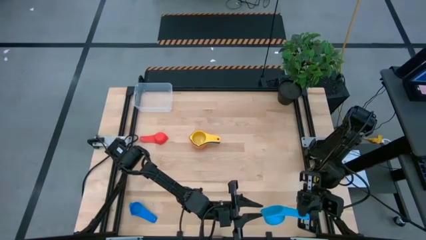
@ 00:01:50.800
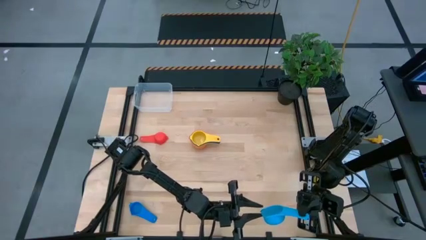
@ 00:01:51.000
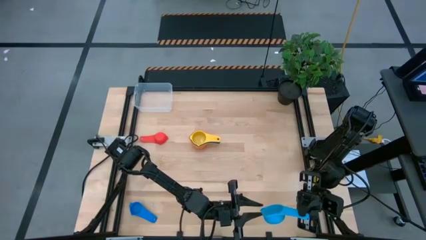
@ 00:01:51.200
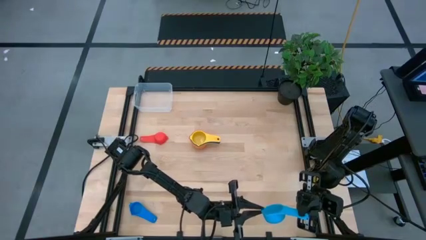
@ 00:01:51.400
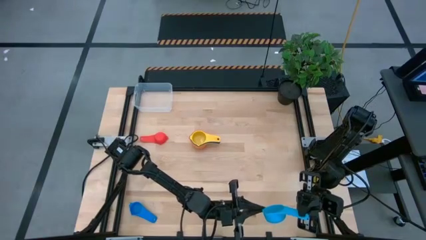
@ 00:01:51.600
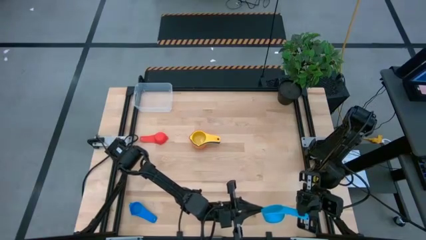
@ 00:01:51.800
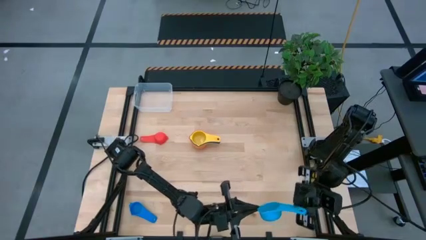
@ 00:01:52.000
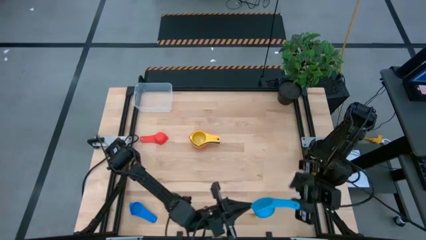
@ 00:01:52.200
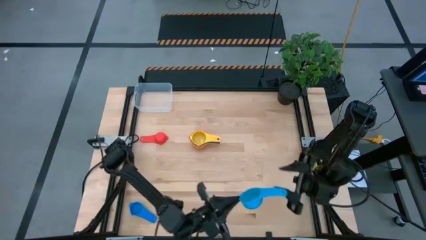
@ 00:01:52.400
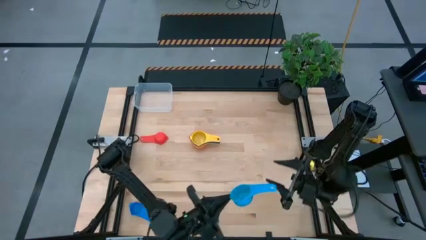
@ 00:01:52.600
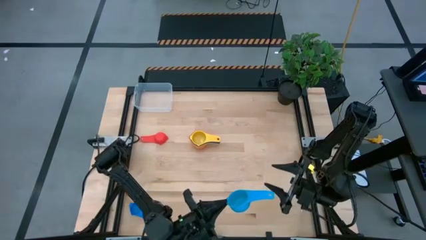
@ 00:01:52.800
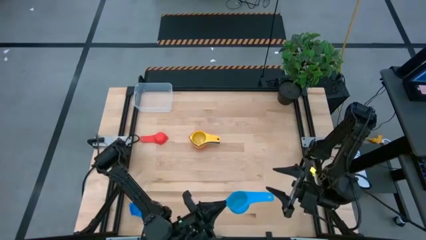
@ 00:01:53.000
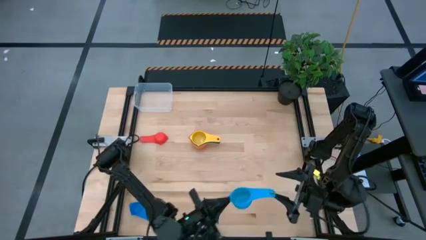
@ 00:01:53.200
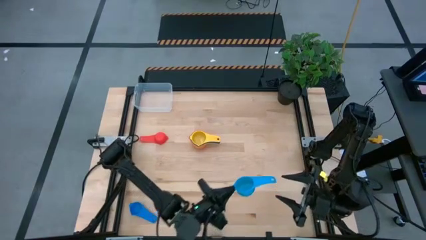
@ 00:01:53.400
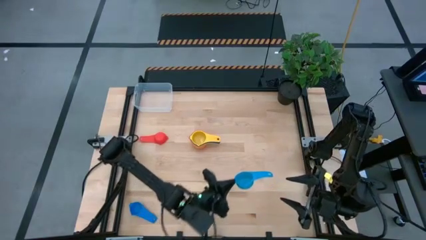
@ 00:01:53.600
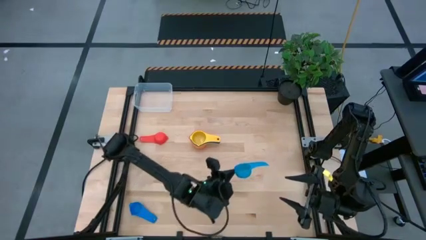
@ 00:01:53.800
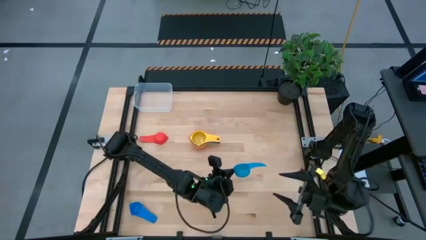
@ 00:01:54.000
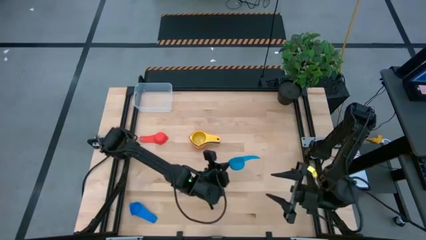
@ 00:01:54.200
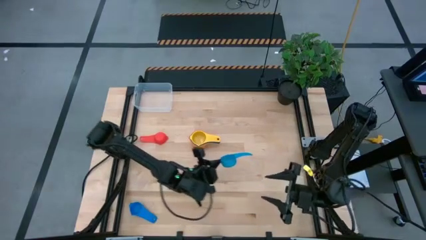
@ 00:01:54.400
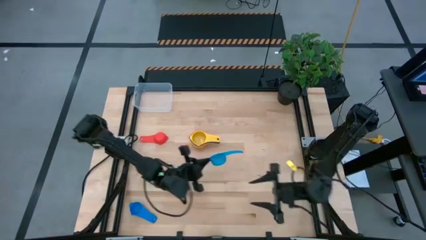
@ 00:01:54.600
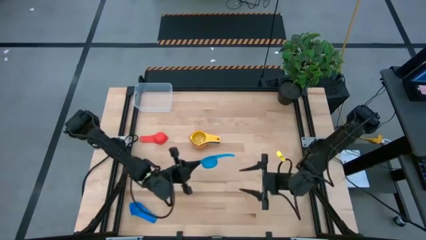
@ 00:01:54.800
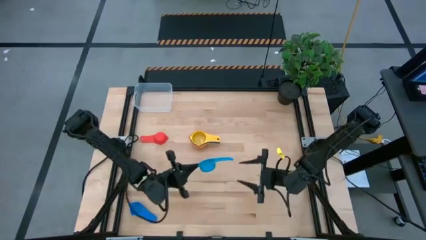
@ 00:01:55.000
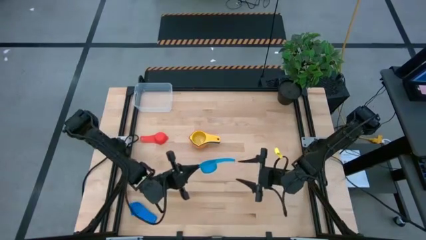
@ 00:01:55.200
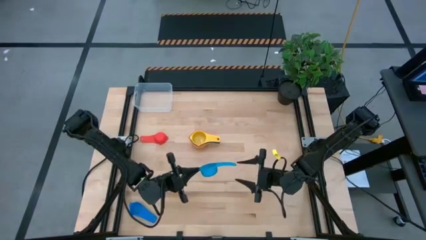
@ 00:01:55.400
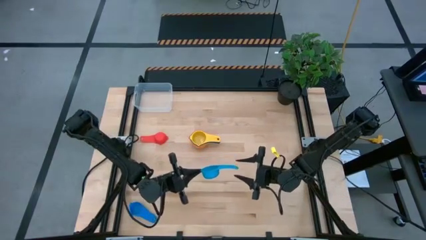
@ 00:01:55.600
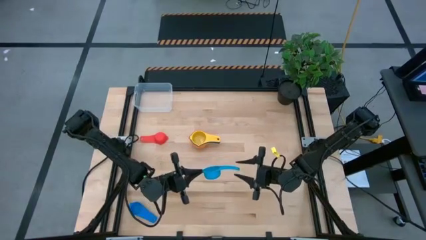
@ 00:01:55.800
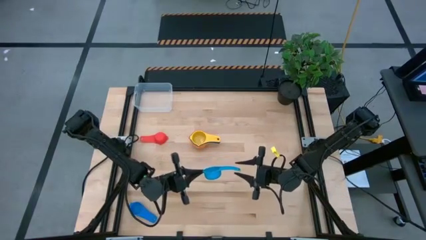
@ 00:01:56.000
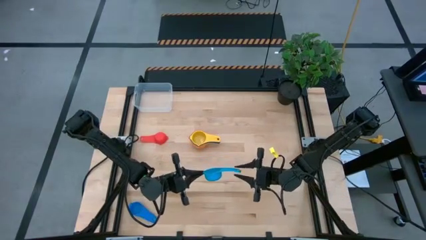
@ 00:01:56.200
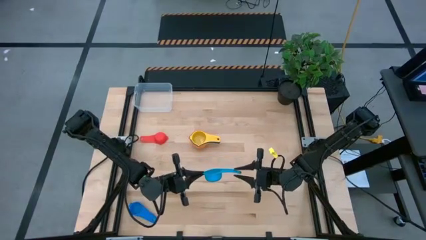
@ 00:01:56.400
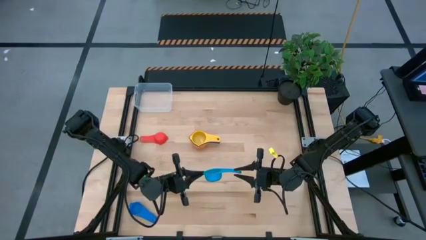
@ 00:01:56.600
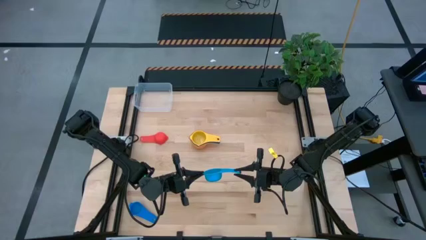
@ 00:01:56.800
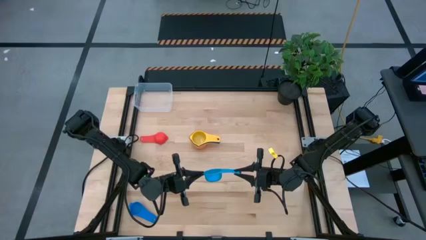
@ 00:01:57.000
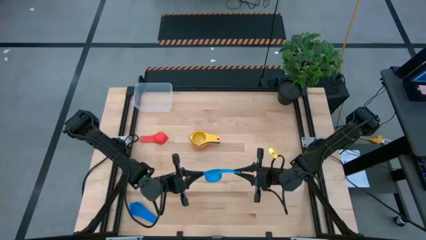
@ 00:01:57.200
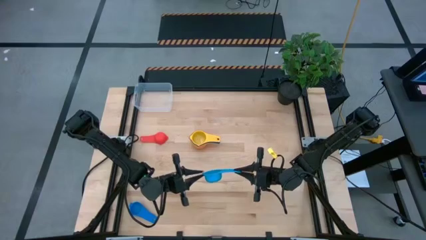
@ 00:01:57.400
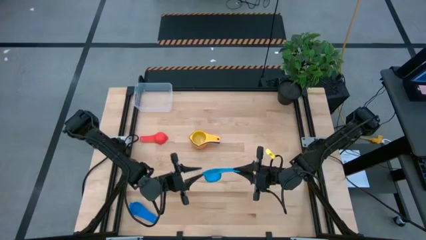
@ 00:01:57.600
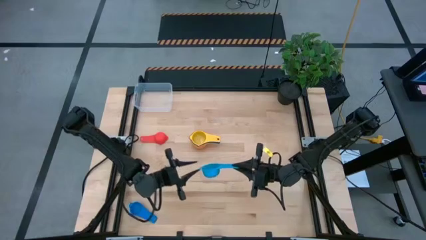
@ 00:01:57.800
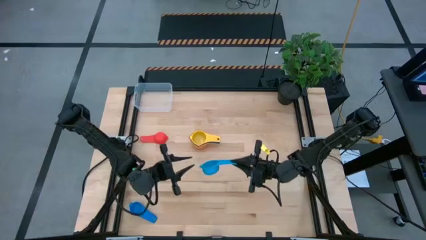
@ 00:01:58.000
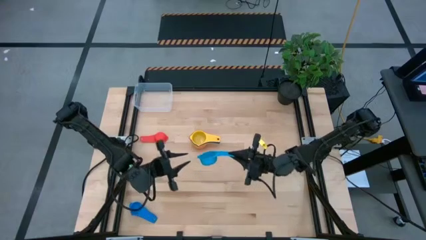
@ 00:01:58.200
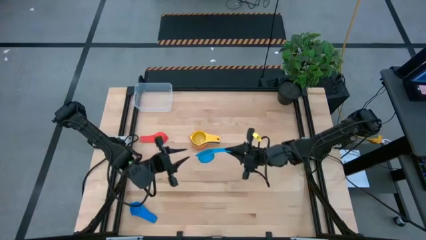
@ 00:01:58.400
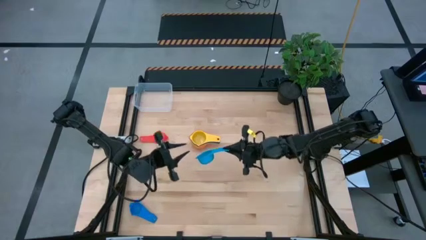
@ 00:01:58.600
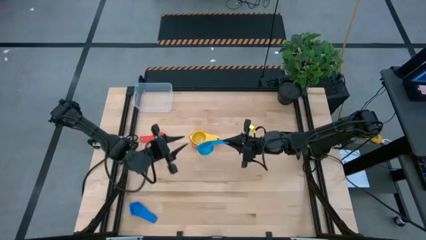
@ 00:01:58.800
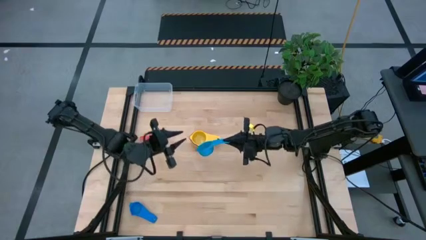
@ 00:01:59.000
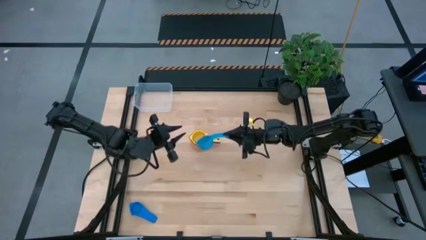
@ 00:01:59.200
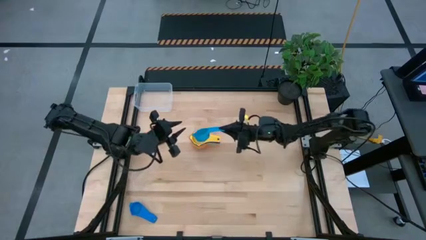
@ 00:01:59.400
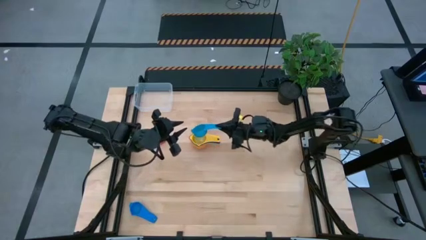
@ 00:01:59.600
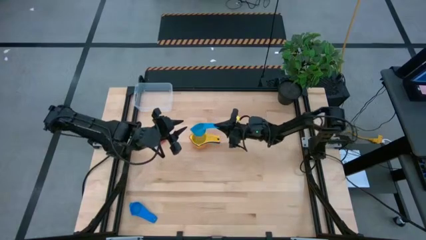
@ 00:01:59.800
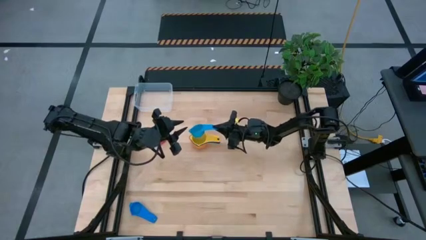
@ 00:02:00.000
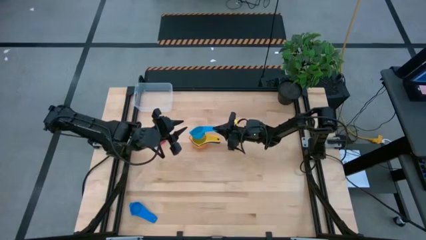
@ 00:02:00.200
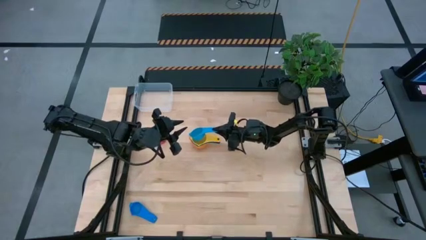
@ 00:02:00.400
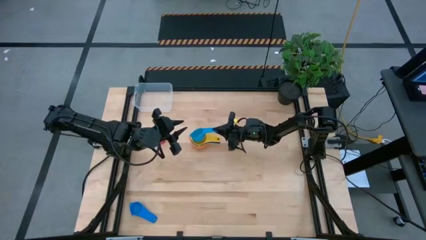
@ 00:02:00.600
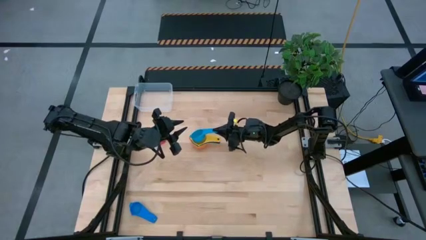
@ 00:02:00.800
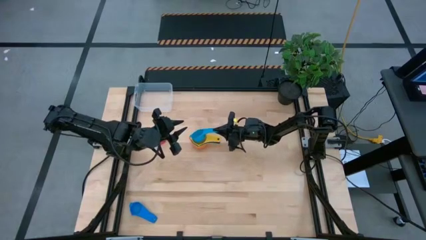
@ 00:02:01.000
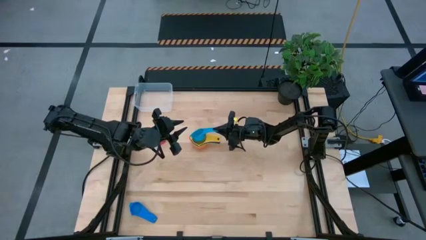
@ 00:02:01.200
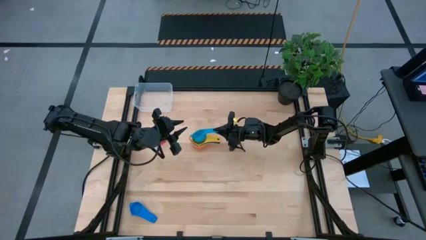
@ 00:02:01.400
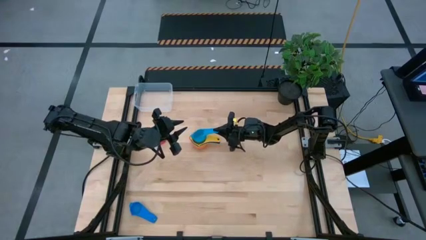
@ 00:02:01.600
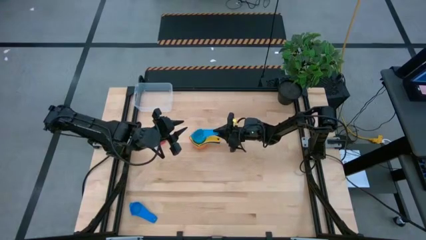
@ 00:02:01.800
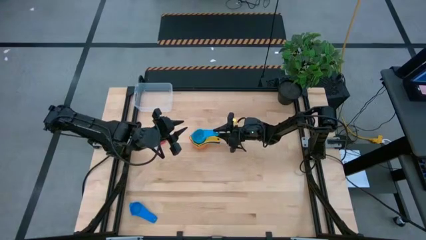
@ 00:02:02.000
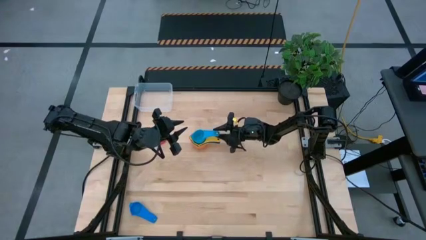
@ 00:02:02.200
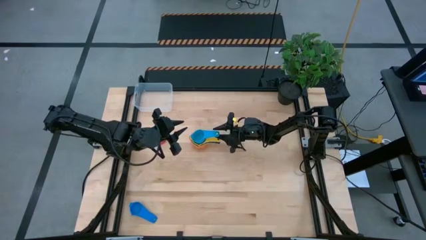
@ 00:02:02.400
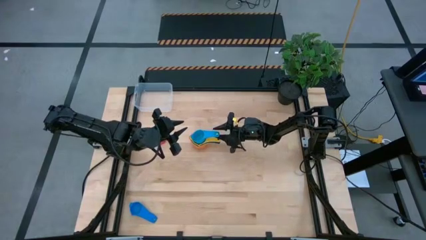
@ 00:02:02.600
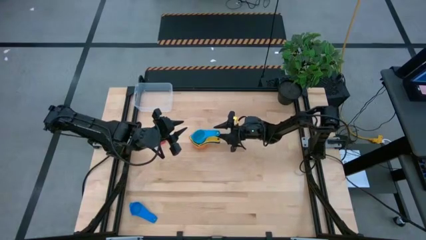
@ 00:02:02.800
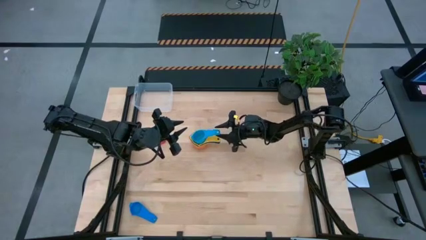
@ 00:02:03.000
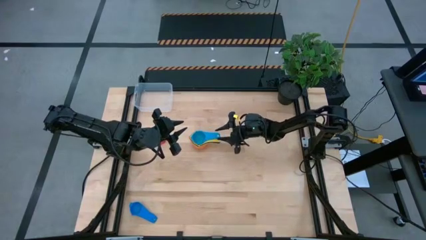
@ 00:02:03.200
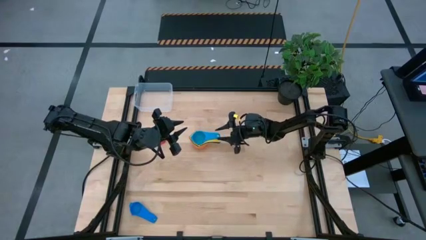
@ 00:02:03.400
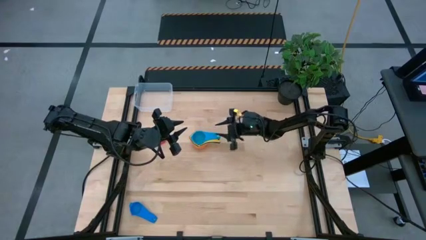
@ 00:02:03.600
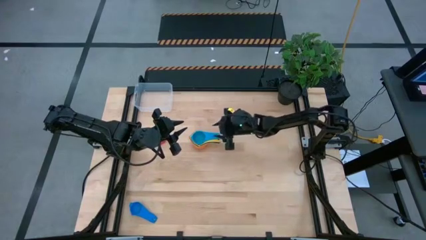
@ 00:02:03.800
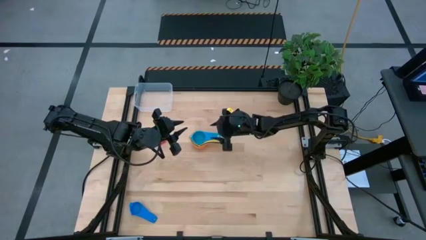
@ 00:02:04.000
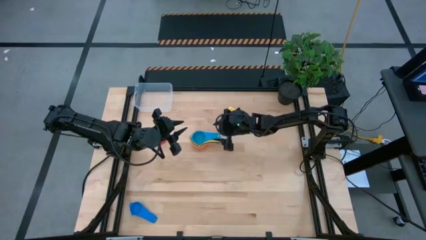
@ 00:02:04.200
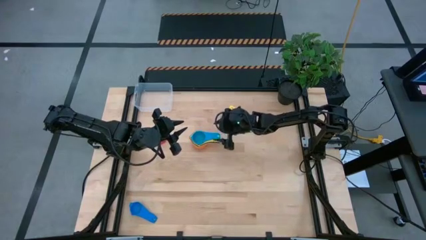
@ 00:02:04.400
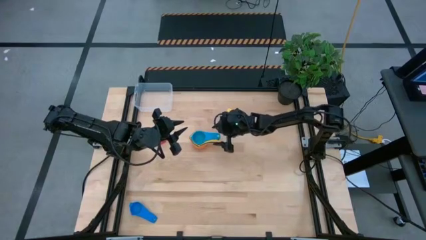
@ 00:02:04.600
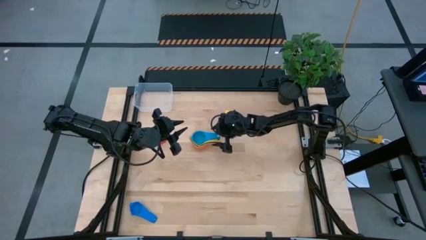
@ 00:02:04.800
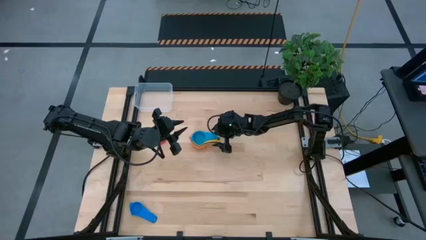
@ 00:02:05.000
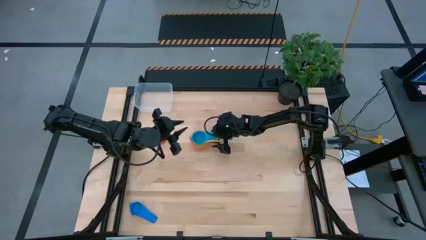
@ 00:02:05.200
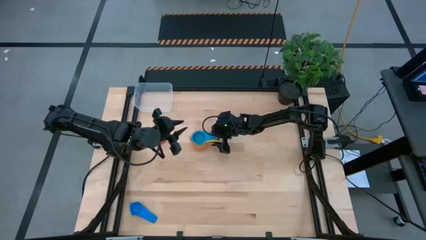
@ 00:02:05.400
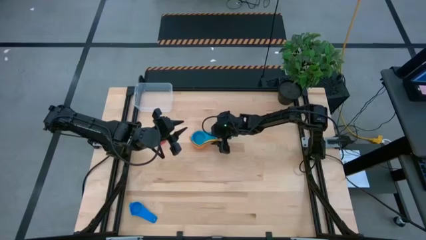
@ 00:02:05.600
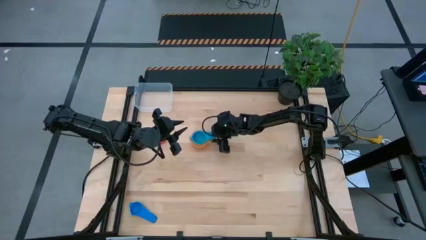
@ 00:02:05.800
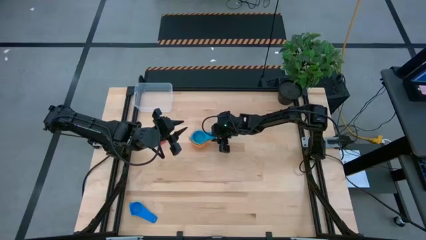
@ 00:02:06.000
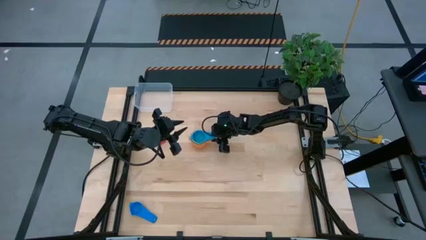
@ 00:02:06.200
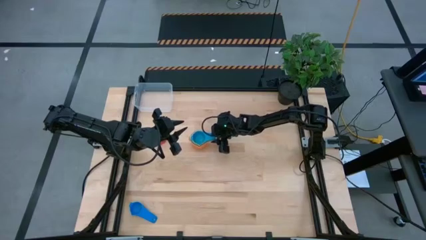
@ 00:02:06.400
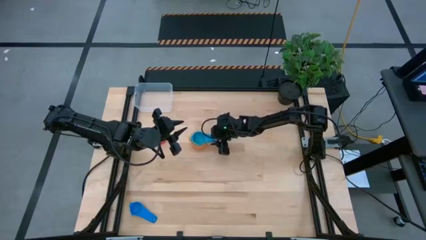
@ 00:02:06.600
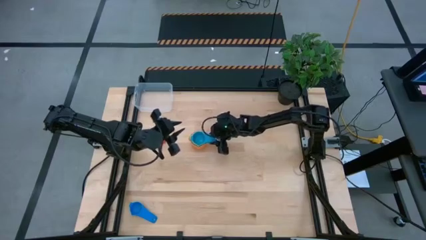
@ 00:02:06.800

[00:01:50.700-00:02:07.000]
Task: Nest measuring cups in basket
Stack the light blue measuring cup on top of the yellow measuring cup
